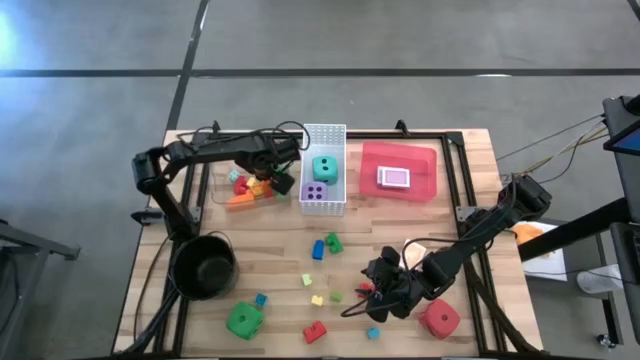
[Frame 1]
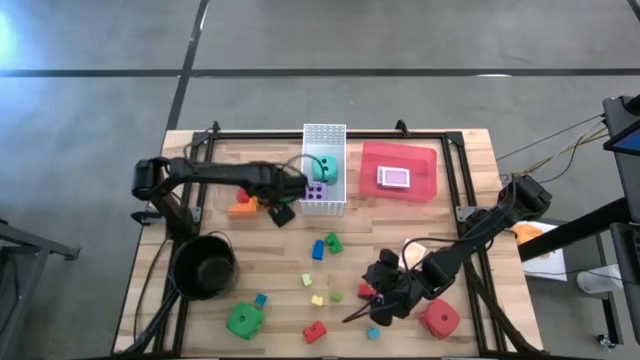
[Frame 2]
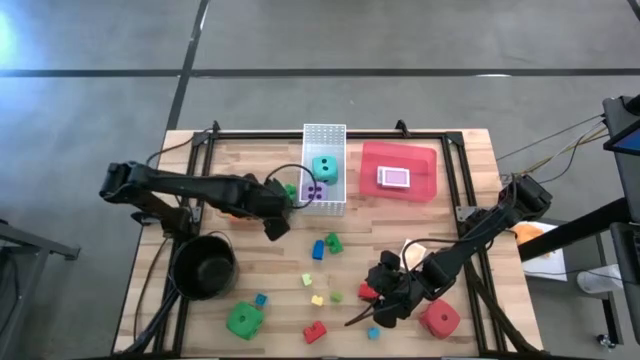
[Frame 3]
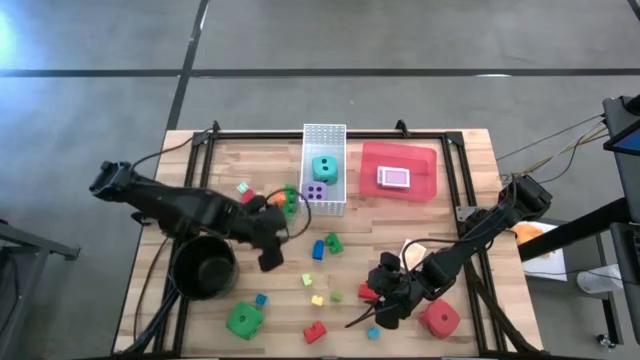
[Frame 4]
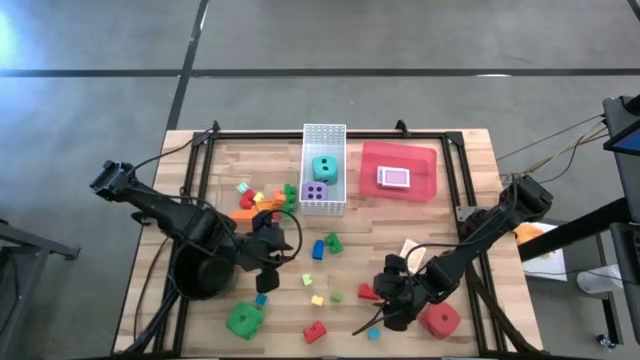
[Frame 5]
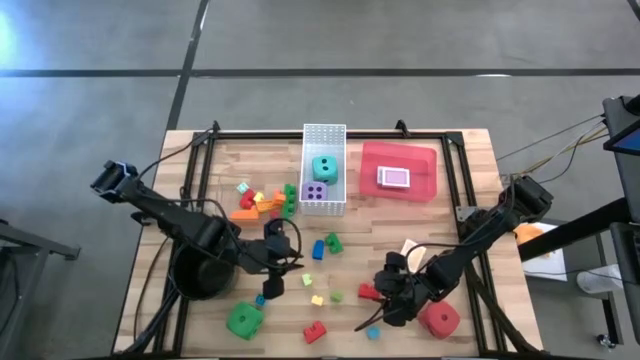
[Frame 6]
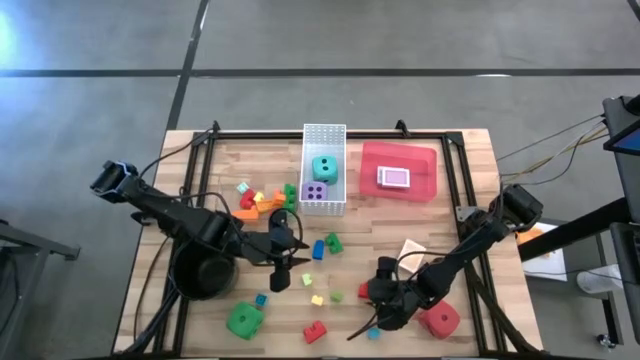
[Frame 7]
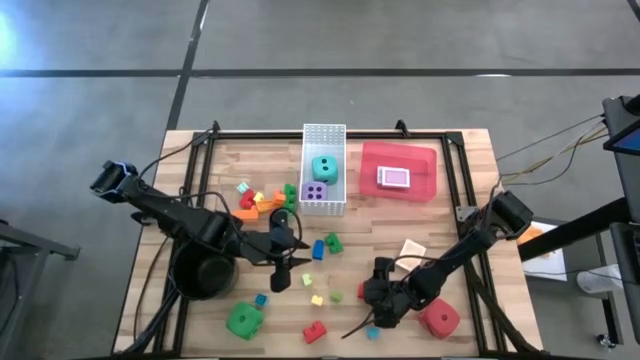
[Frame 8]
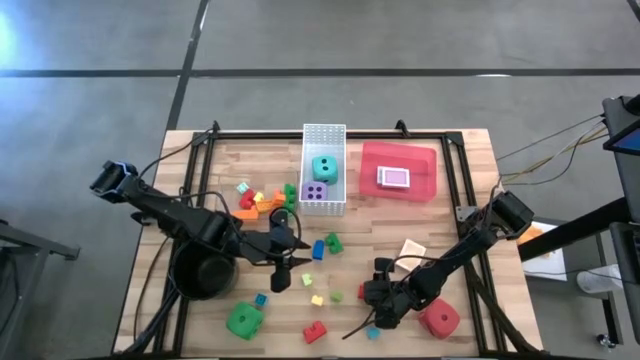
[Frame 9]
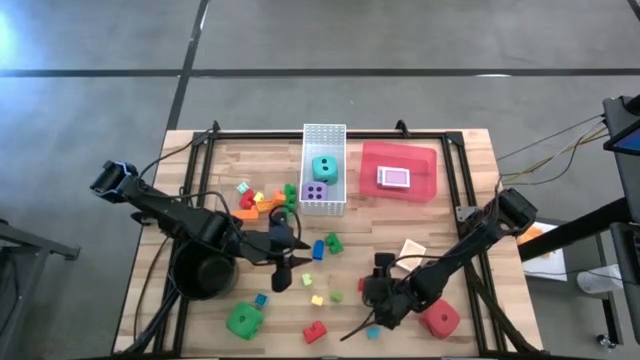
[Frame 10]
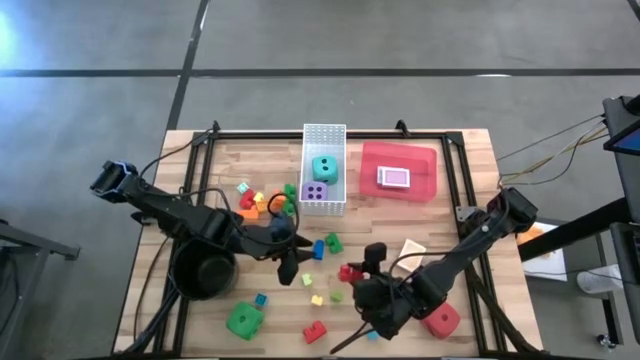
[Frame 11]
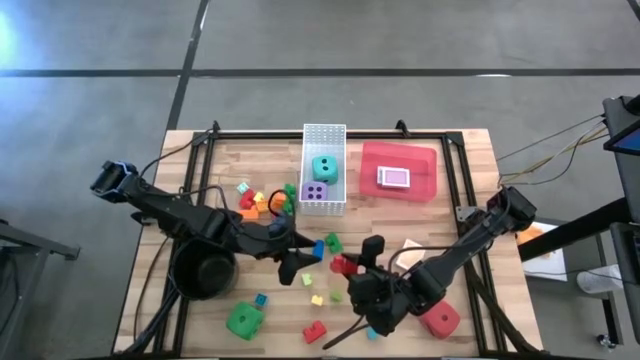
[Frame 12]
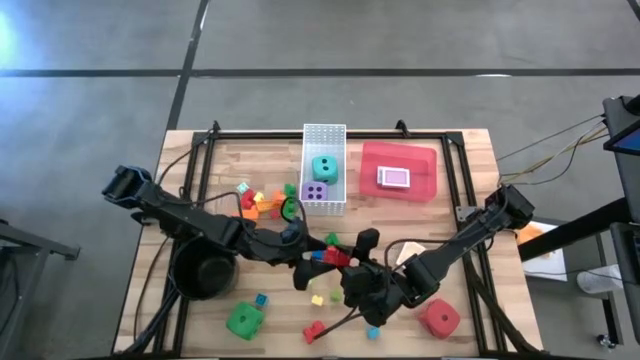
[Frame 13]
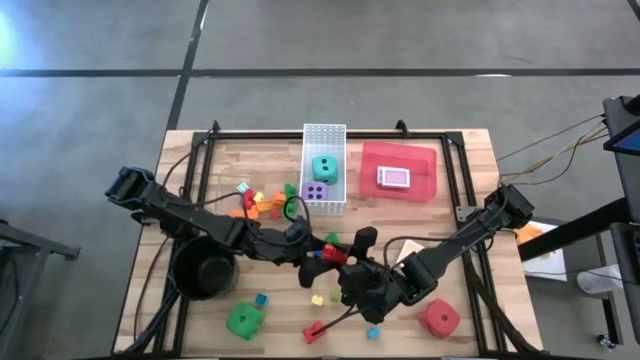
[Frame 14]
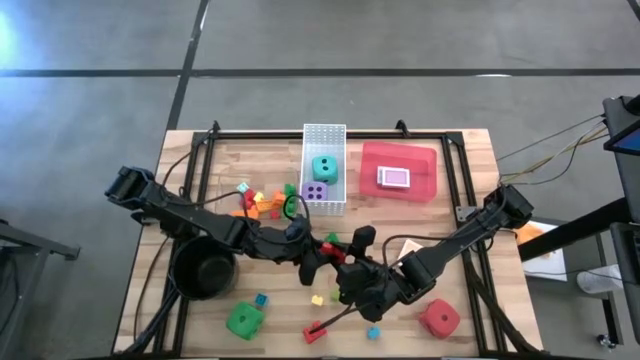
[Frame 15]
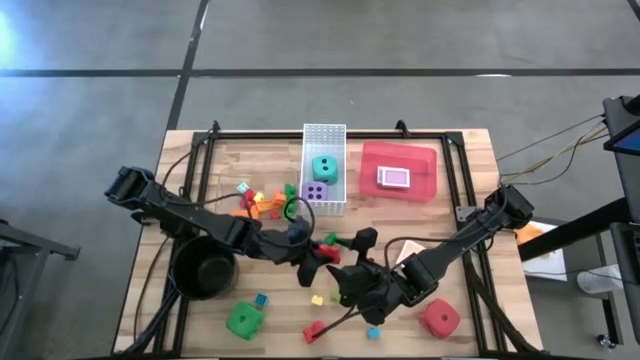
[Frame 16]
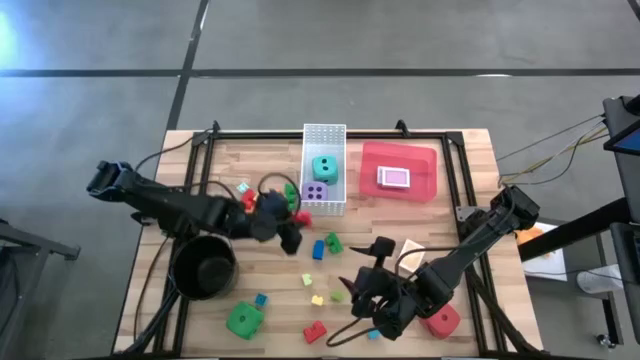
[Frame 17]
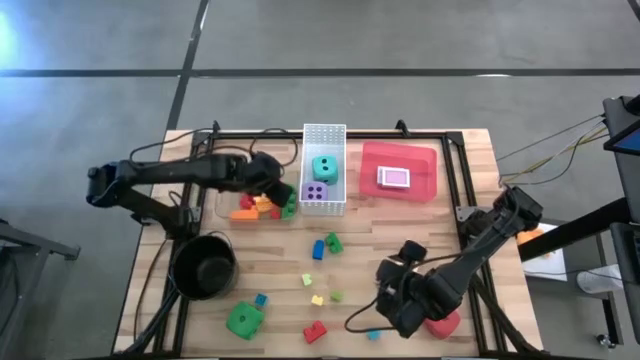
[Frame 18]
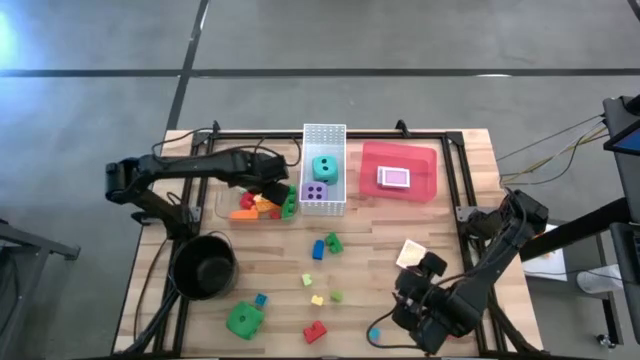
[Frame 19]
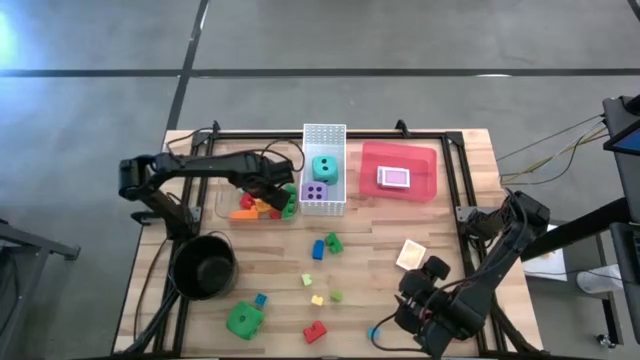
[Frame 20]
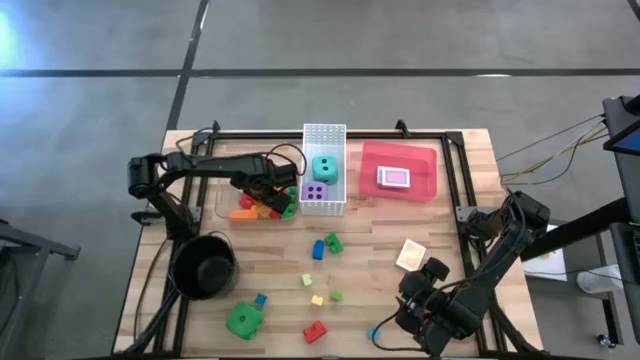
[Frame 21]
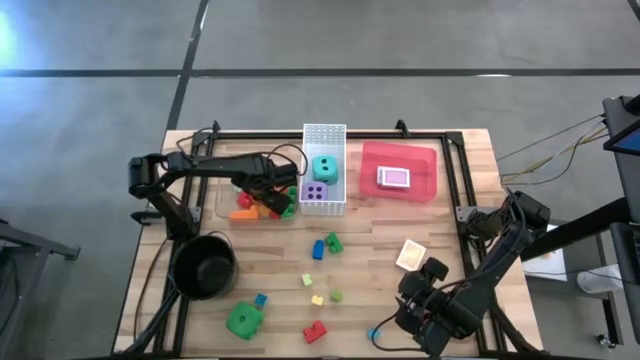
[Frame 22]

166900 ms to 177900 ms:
Task: Pick & Place Toys
Put the red game piece into the transparent bin

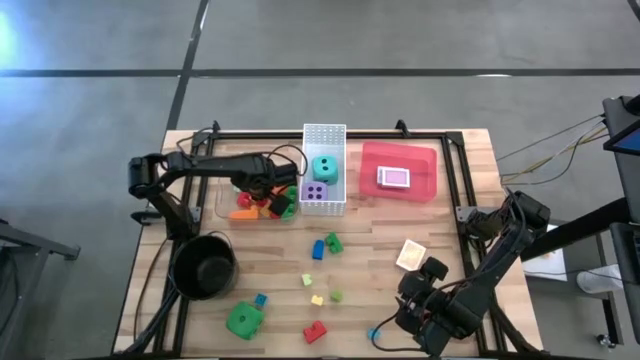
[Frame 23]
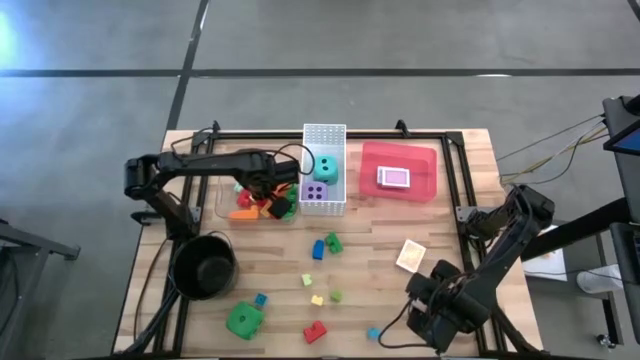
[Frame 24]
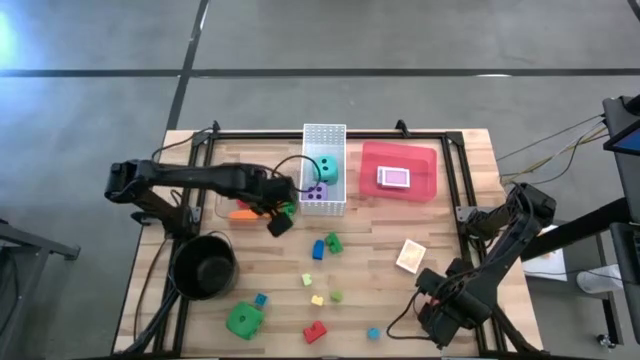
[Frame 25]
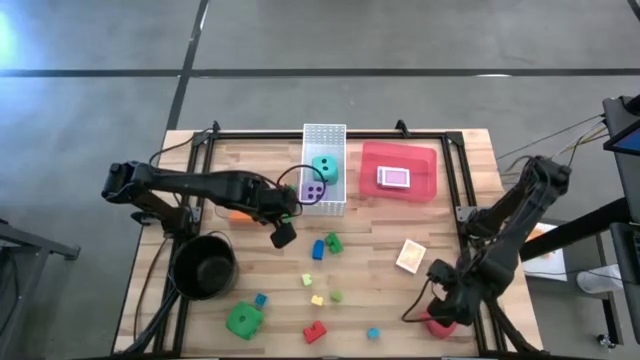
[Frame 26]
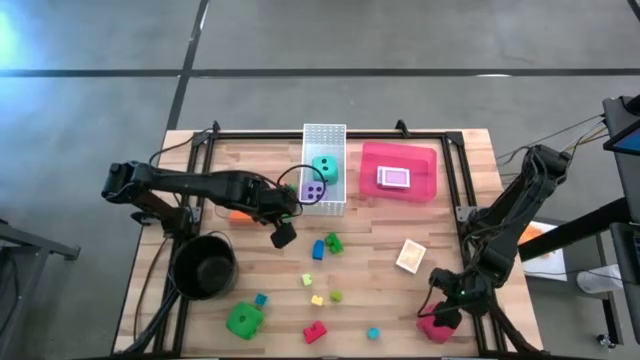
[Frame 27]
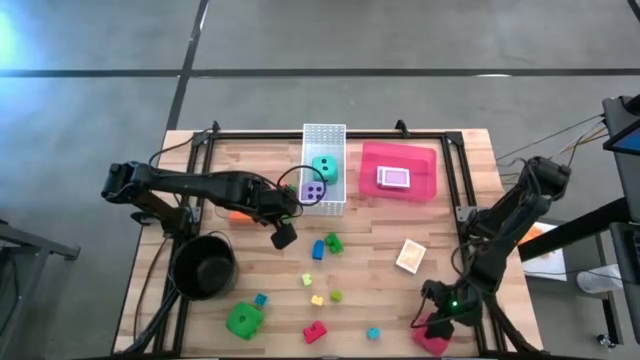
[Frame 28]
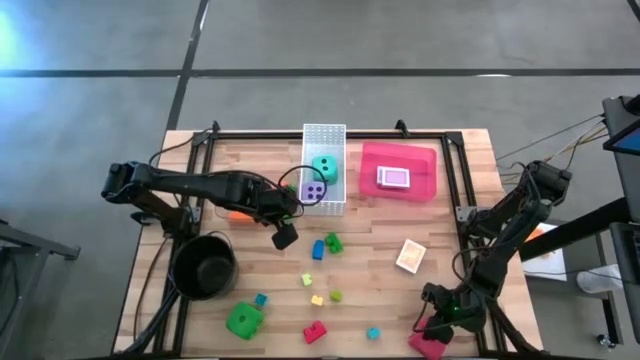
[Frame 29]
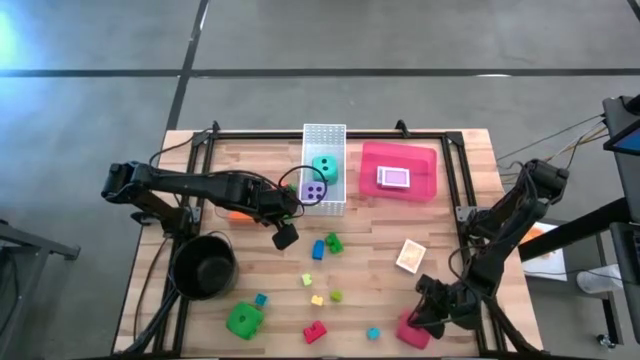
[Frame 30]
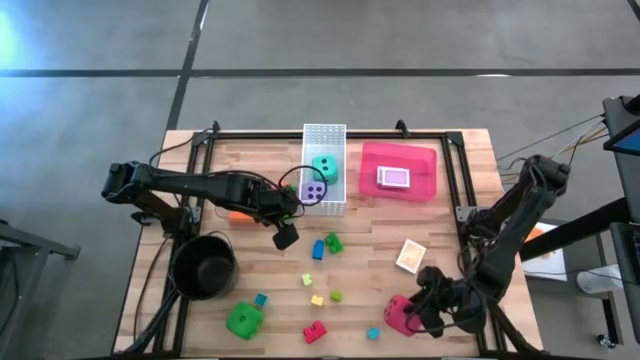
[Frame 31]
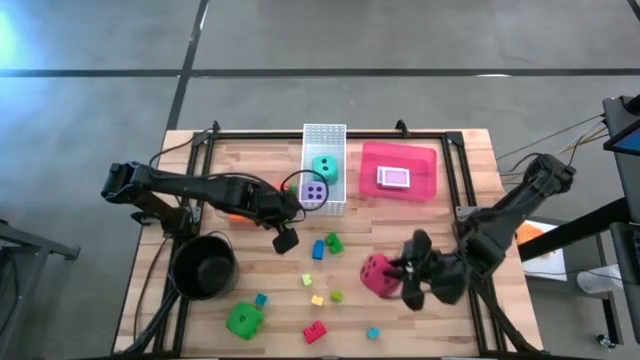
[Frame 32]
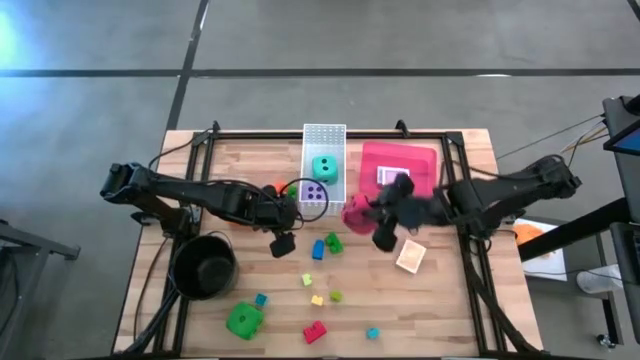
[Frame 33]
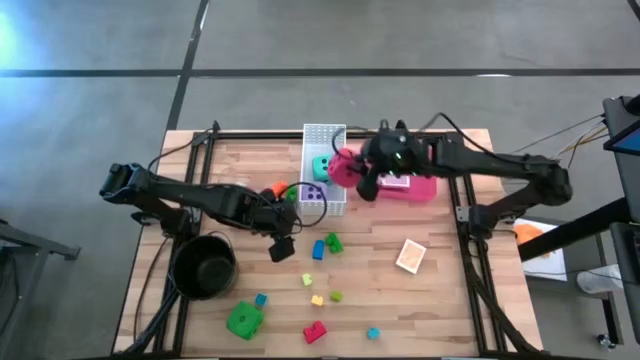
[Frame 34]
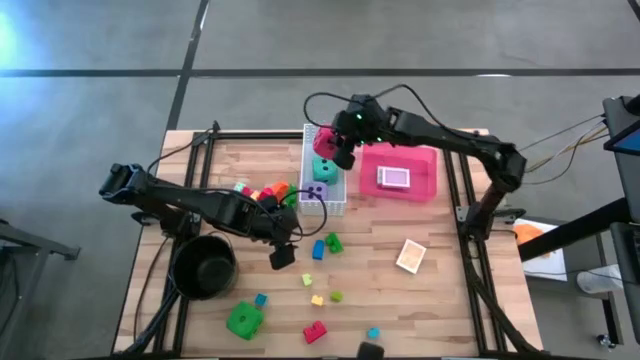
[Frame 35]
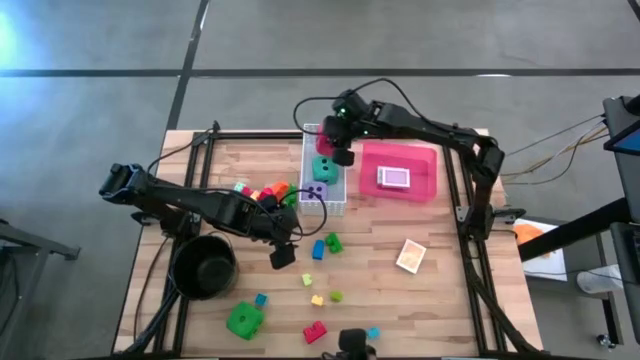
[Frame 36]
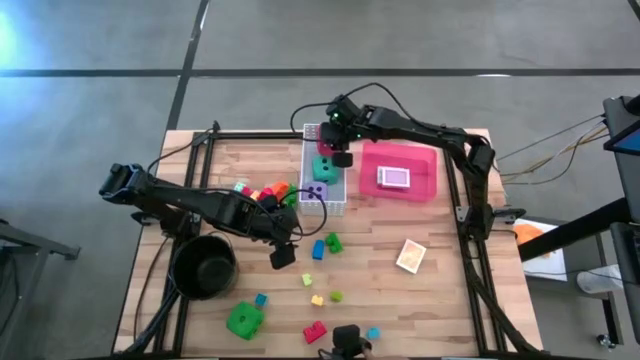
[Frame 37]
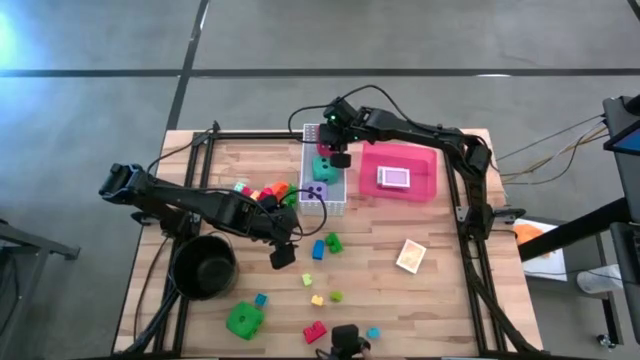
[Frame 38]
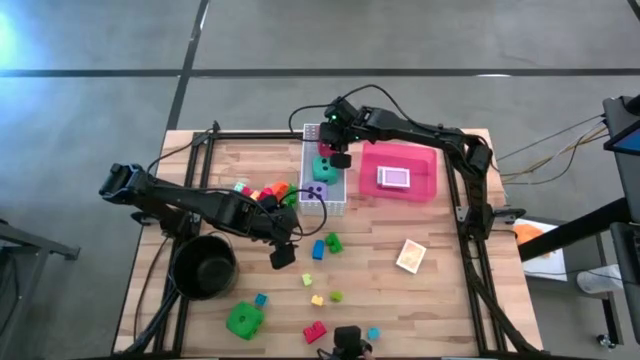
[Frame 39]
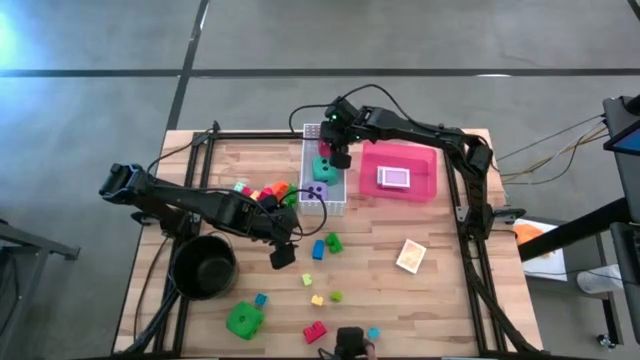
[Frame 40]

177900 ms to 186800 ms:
Put the red dice into the white bin
